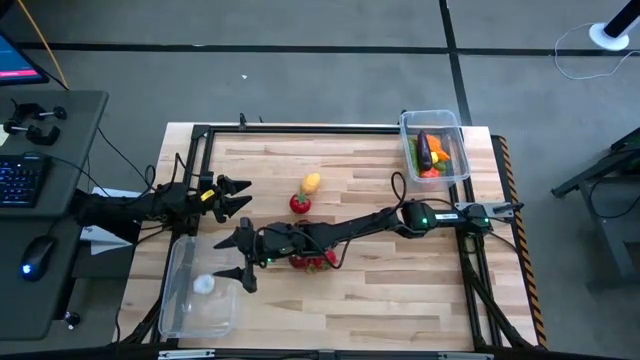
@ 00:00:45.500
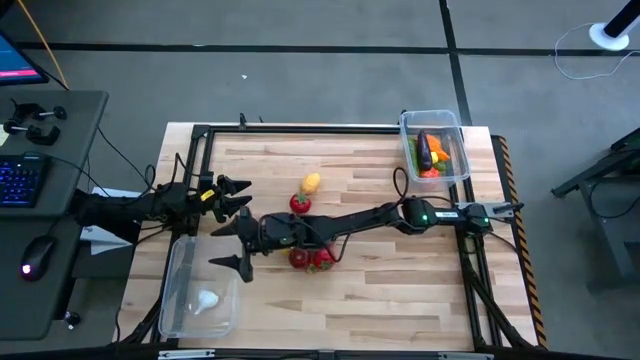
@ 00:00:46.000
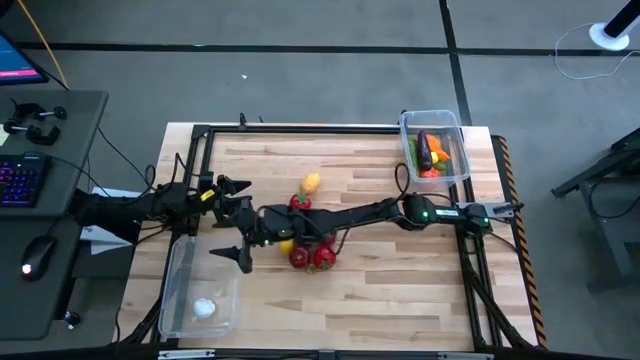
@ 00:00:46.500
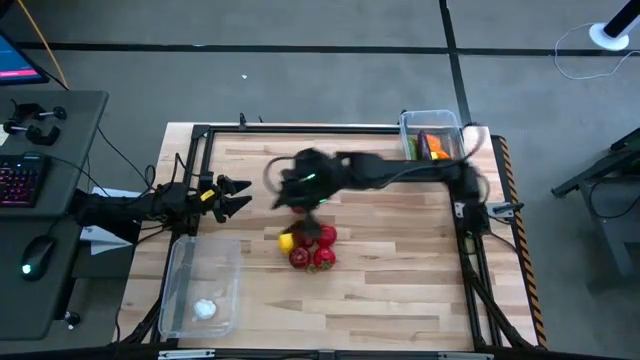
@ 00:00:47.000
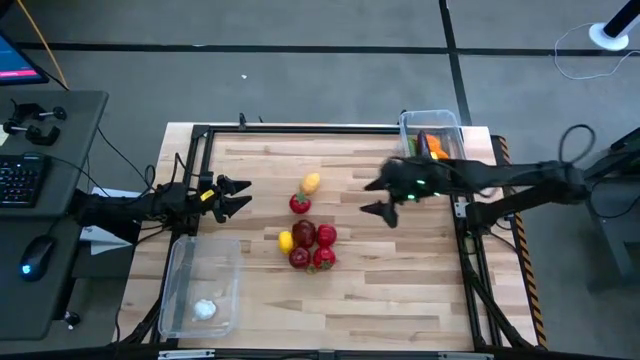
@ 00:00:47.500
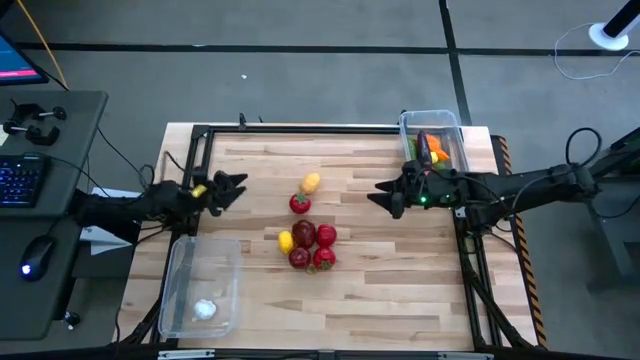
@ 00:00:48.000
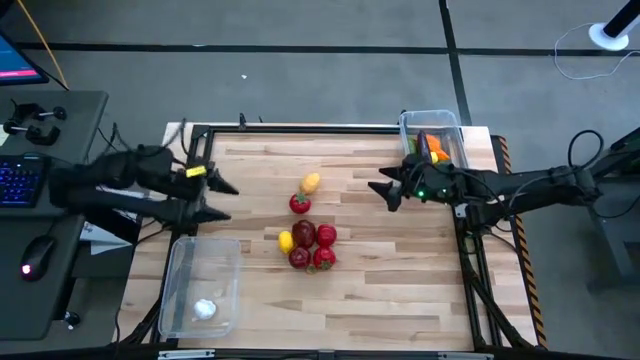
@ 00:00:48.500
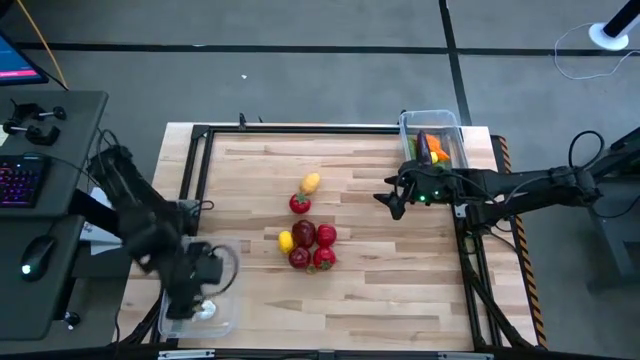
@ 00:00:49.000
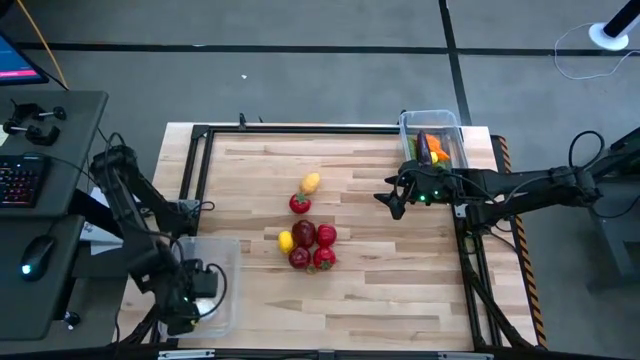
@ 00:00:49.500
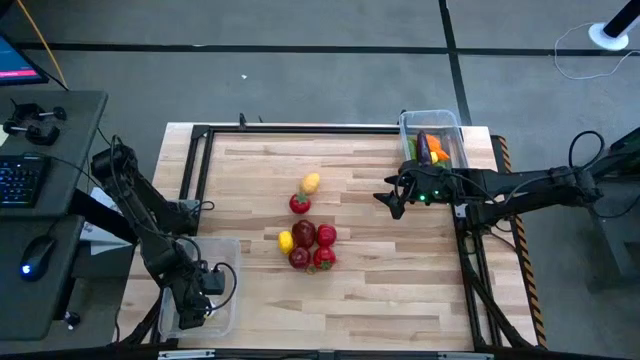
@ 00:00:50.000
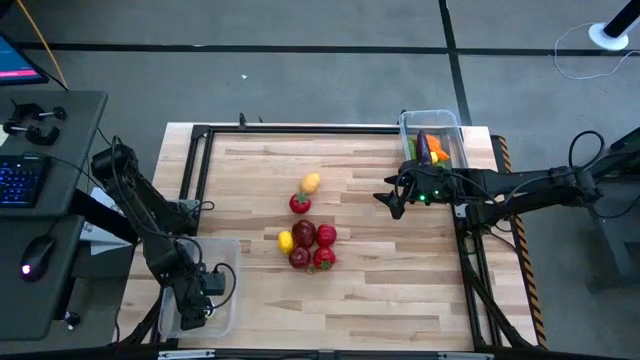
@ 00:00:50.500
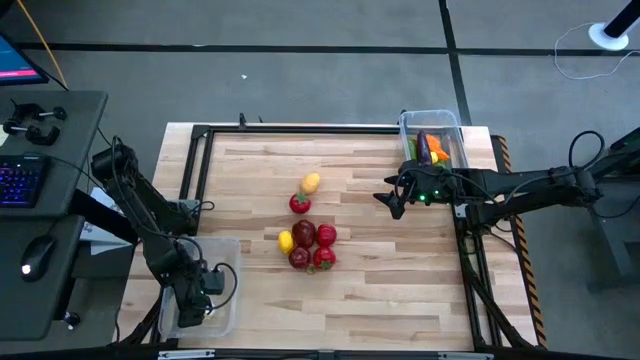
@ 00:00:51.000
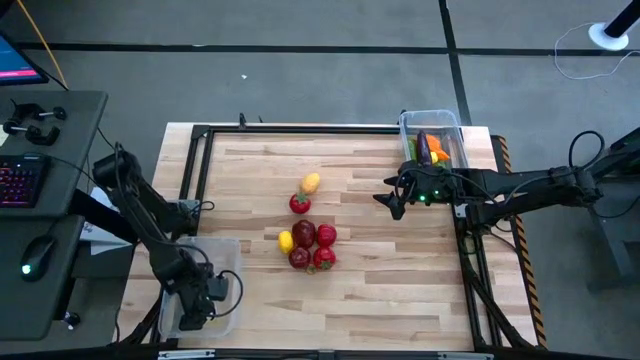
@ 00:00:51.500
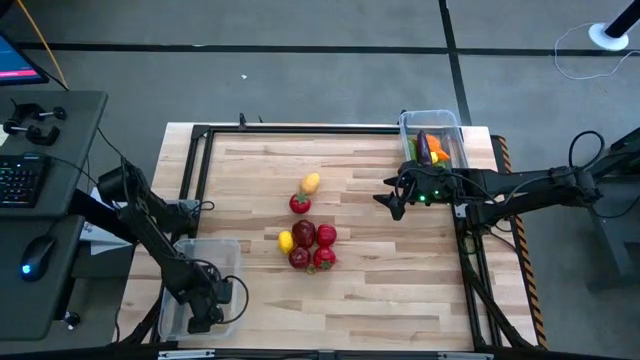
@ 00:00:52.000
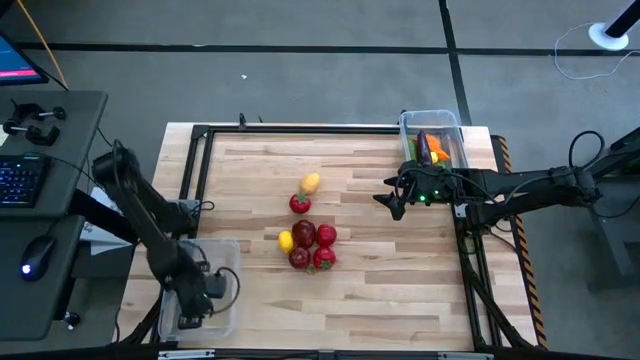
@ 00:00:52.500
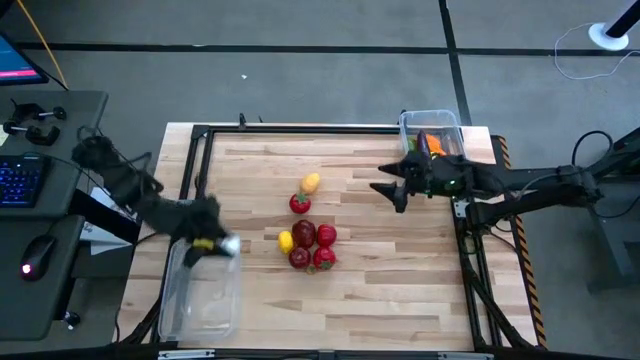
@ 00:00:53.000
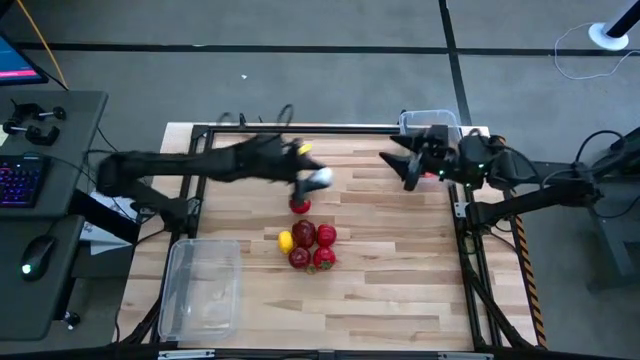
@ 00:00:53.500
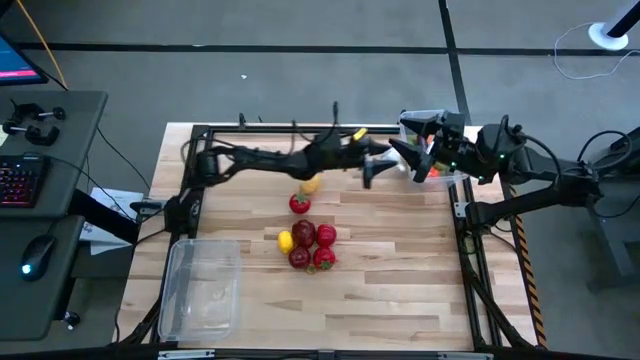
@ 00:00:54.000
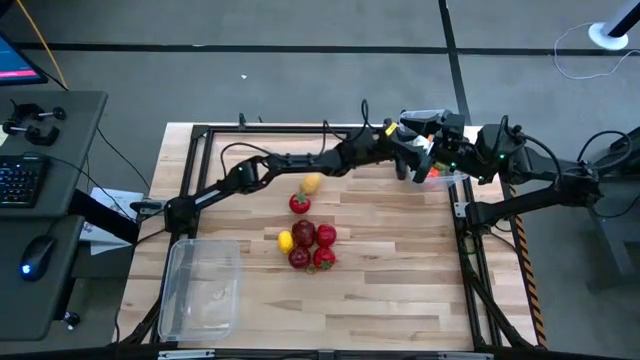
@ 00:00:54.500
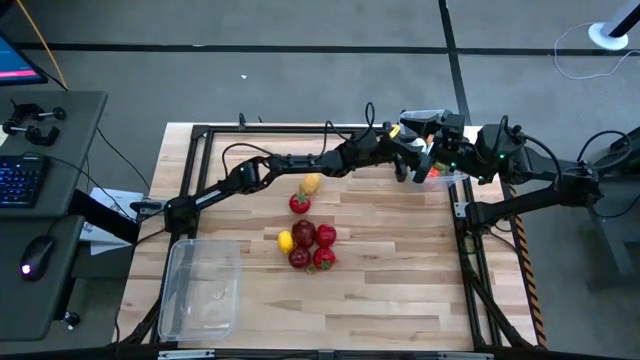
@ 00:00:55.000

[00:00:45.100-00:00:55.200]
Task: Sort produce into baskets
Put the white garlic into the top transparent bin

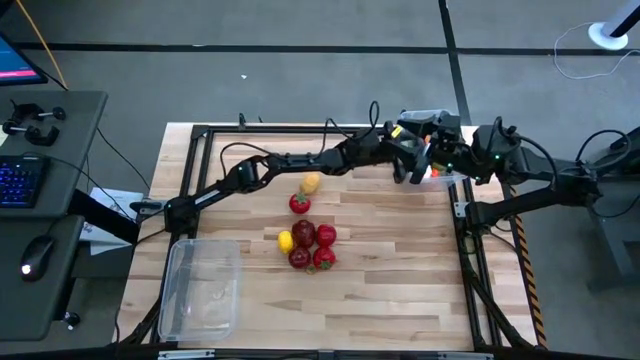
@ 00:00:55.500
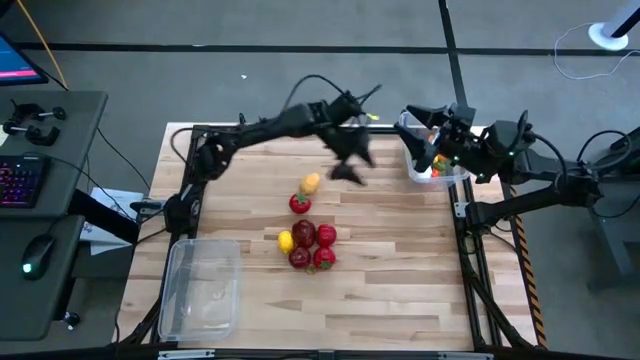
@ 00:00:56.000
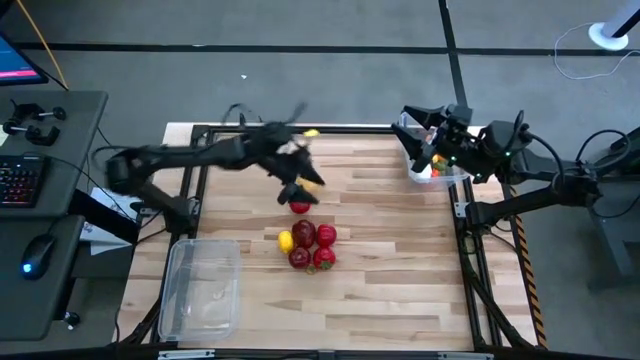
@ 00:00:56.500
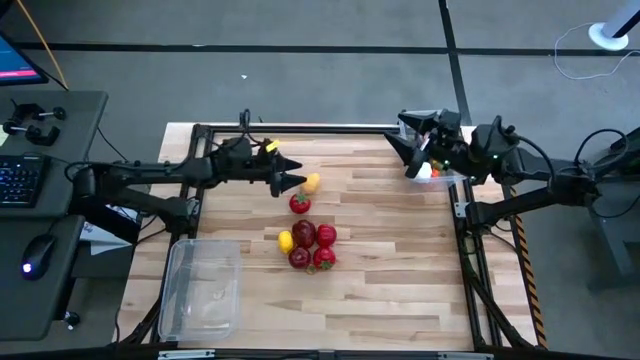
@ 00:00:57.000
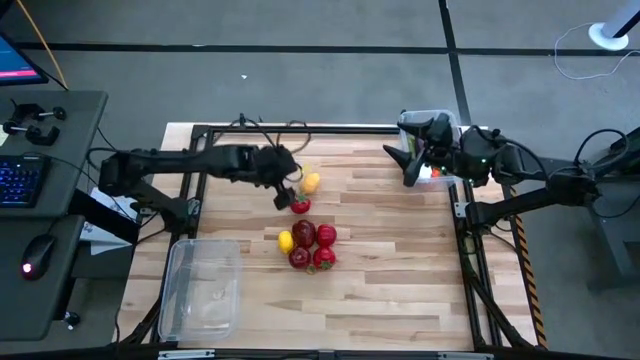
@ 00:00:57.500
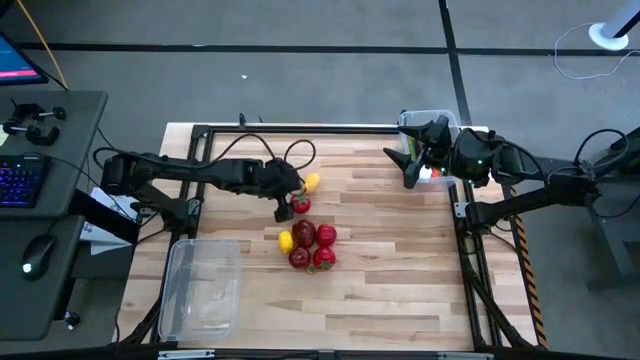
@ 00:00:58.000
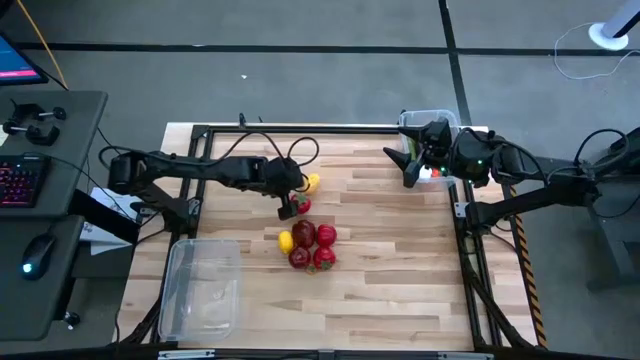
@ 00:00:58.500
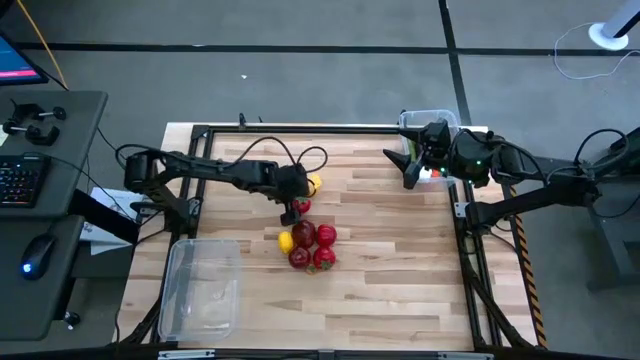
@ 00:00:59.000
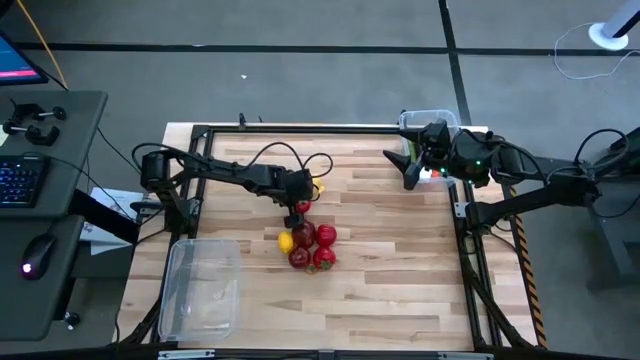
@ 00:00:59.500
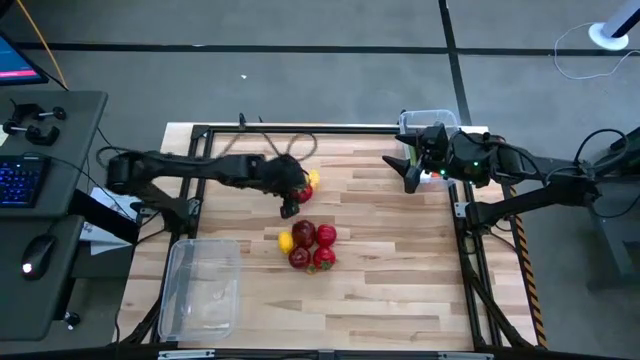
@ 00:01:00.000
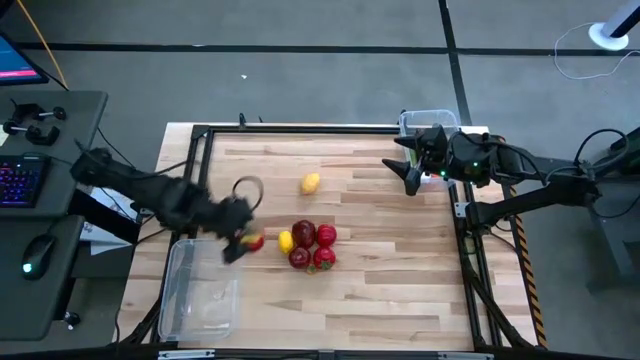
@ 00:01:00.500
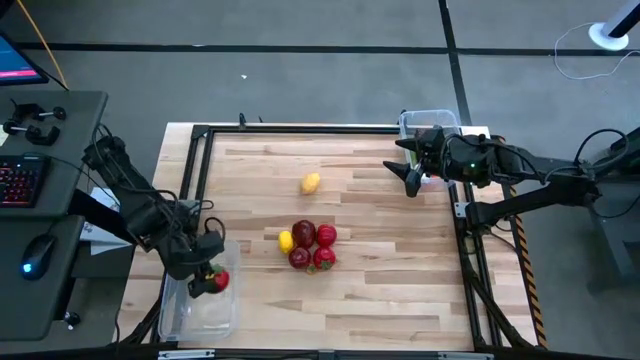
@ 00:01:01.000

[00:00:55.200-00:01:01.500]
Put the top bottom red tomato into the bottom transparent bin

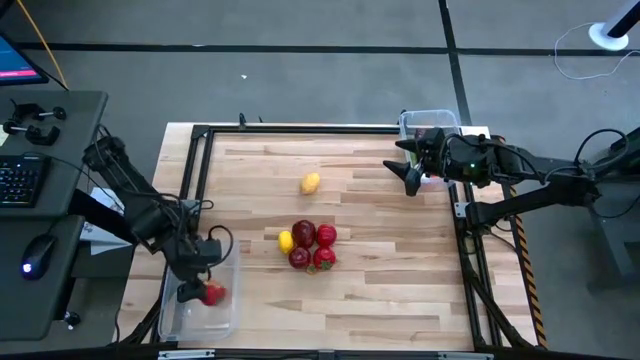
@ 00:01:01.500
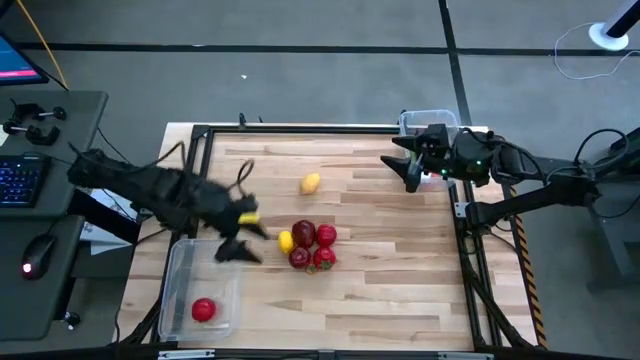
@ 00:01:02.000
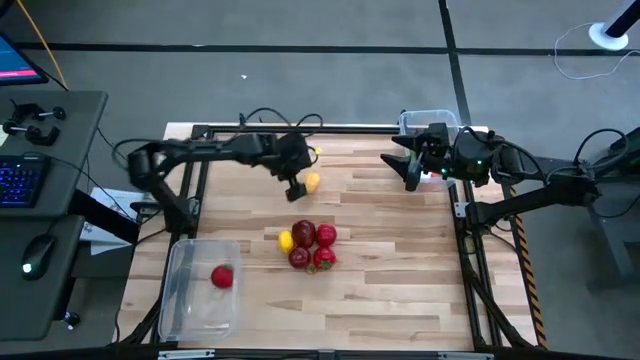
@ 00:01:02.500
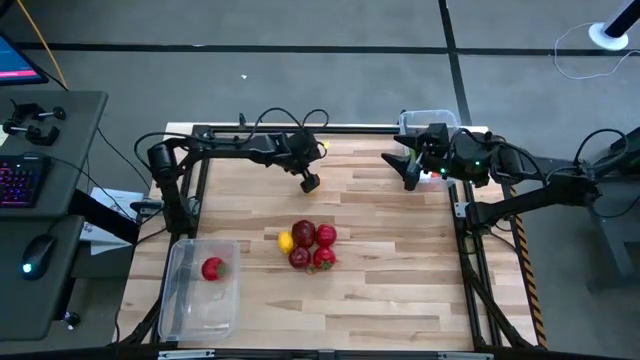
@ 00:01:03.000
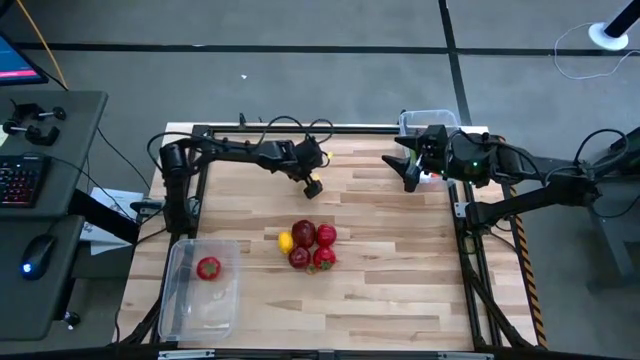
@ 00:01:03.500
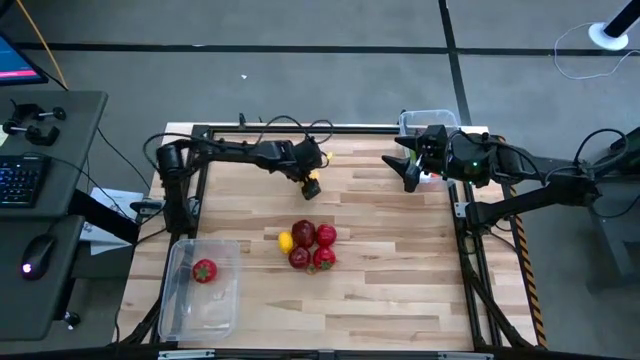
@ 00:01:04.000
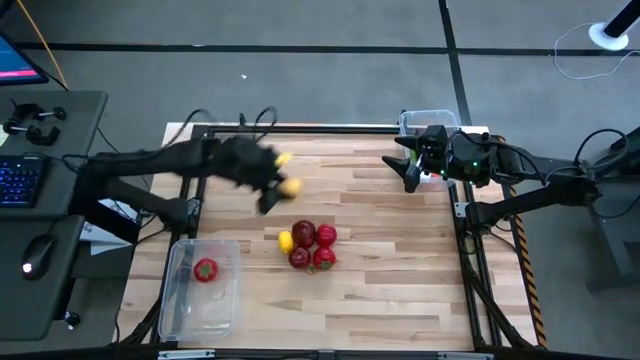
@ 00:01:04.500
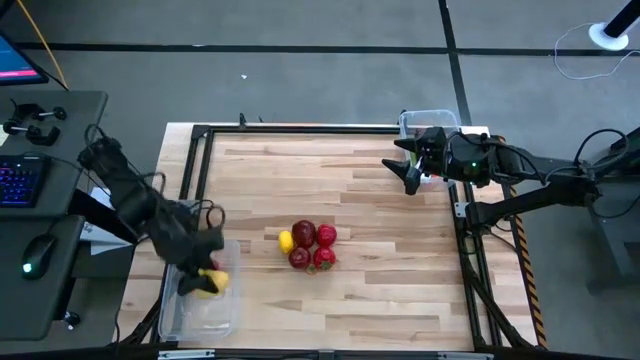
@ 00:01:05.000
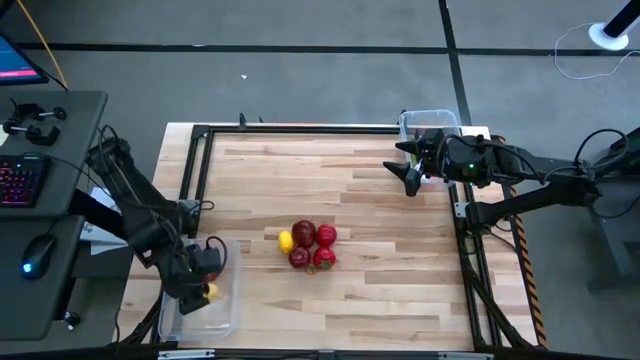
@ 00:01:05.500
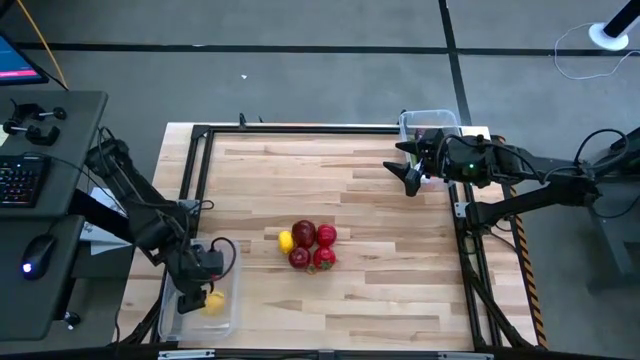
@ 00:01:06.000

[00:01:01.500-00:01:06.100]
Put the top yellow lemon into the bottom transparent bin

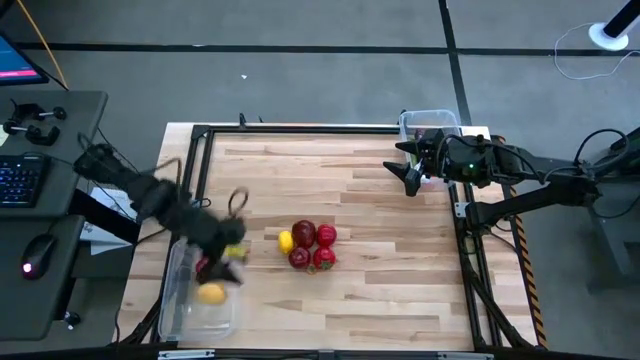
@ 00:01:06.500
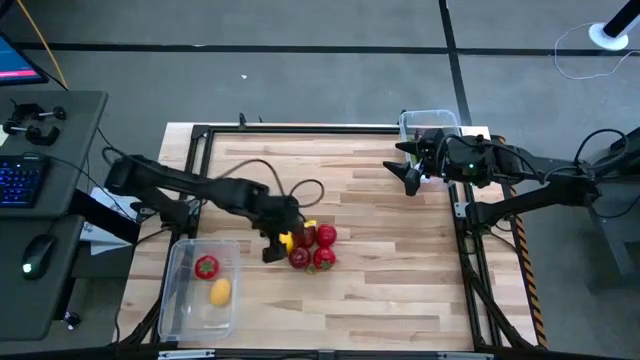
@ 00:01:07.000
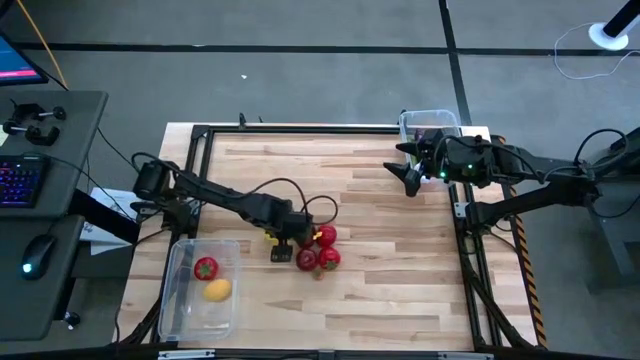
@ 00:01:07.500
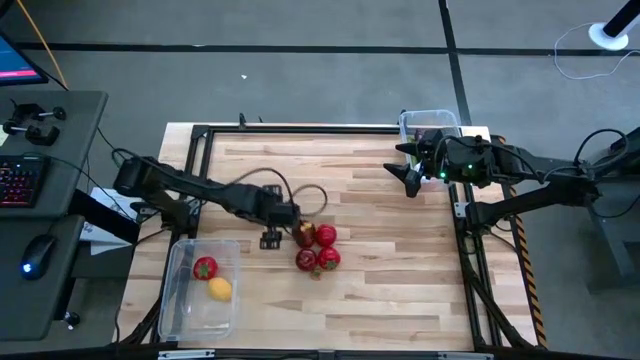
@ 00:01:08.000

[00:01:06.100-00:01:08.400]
Put the yellow lemon into the bottom transparent bin
